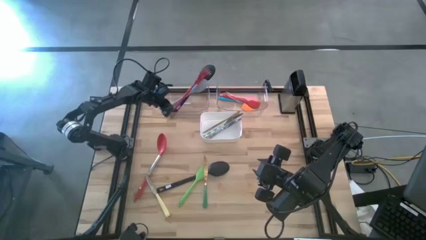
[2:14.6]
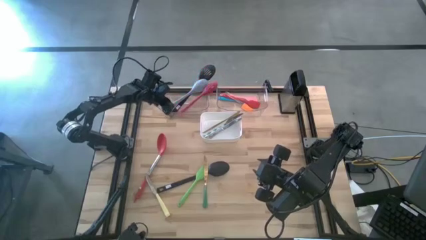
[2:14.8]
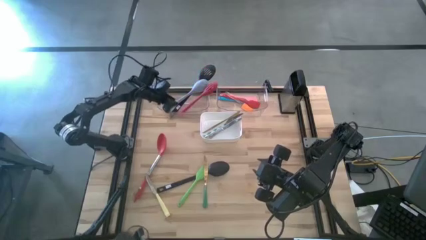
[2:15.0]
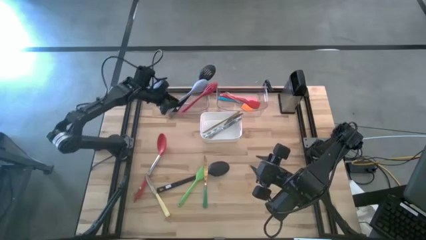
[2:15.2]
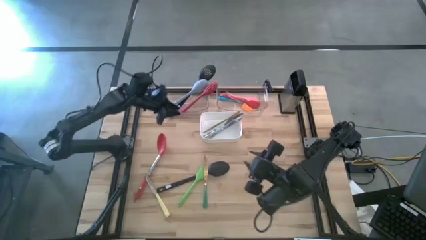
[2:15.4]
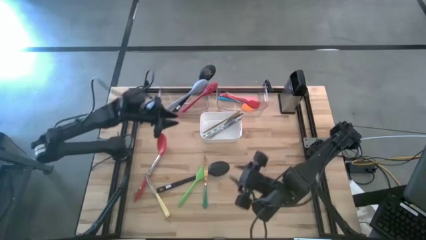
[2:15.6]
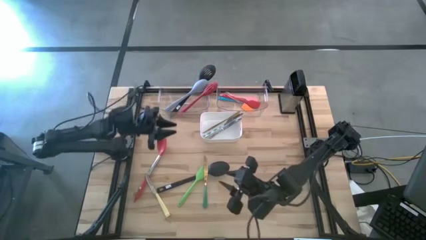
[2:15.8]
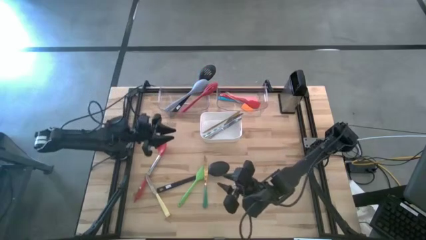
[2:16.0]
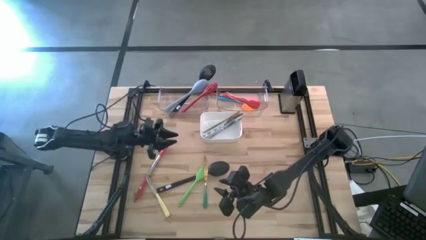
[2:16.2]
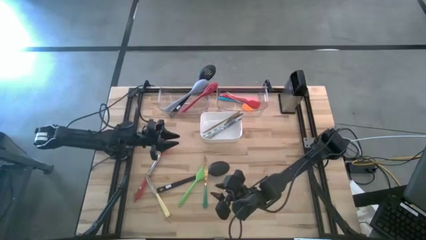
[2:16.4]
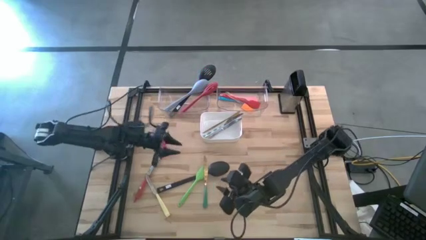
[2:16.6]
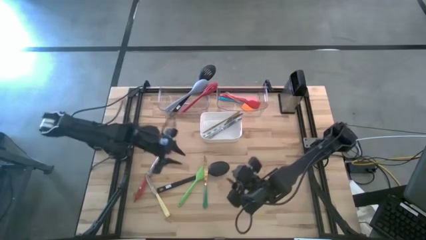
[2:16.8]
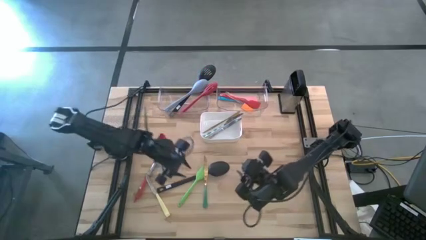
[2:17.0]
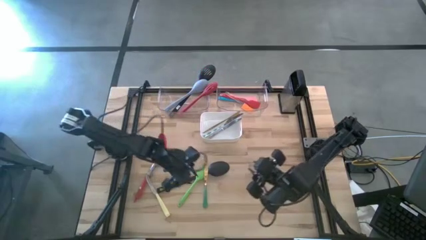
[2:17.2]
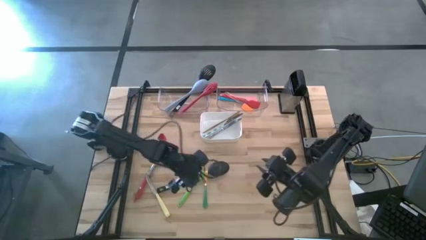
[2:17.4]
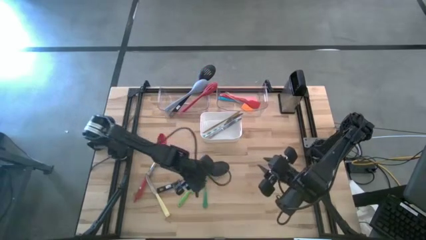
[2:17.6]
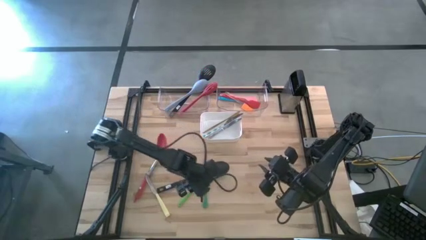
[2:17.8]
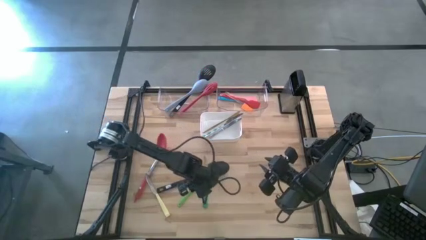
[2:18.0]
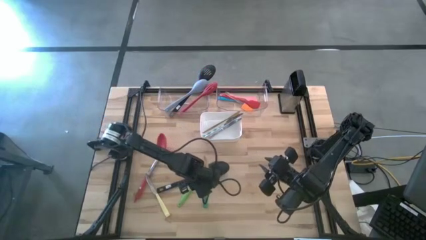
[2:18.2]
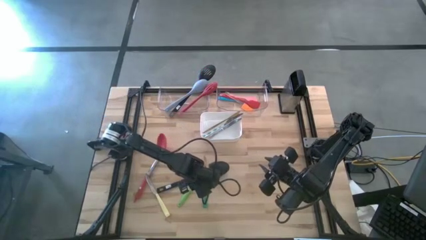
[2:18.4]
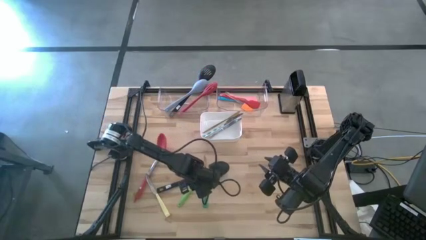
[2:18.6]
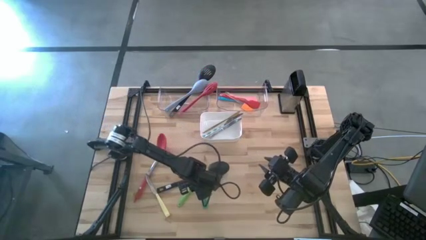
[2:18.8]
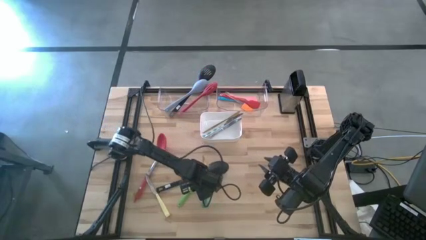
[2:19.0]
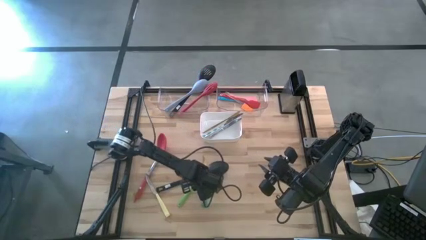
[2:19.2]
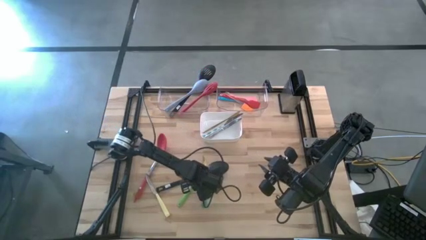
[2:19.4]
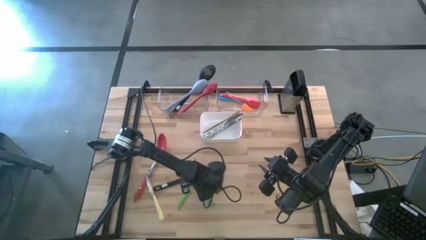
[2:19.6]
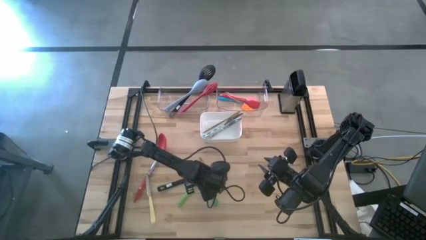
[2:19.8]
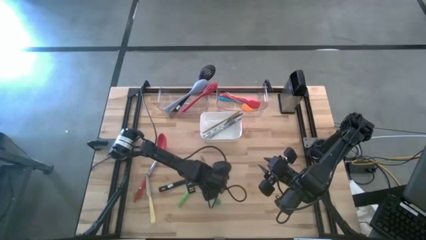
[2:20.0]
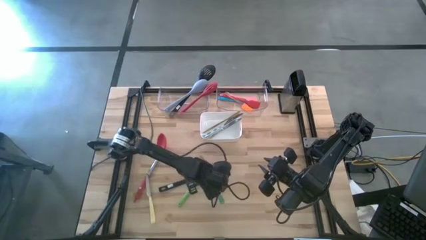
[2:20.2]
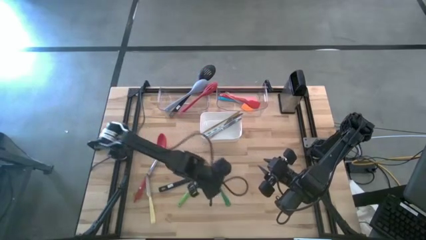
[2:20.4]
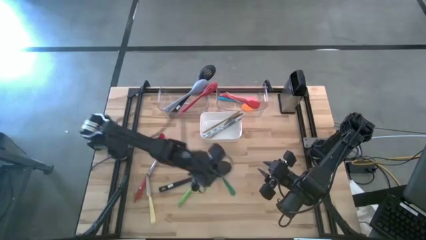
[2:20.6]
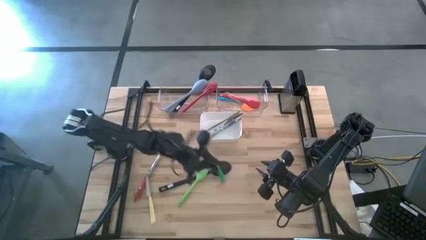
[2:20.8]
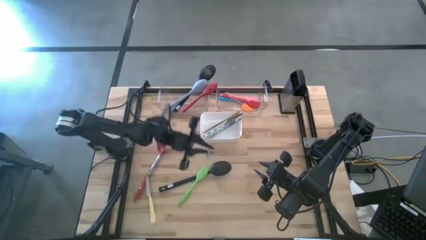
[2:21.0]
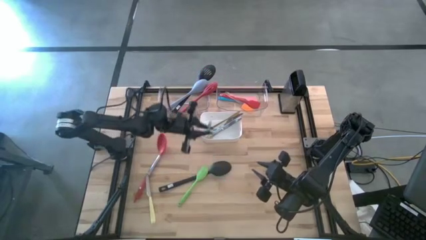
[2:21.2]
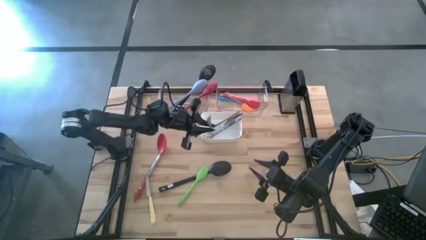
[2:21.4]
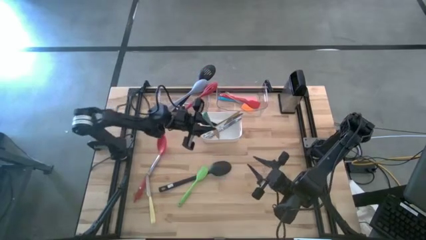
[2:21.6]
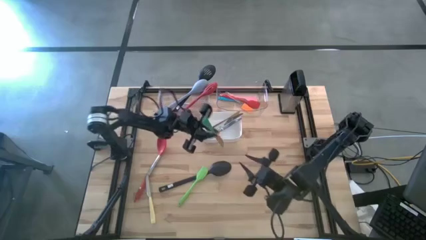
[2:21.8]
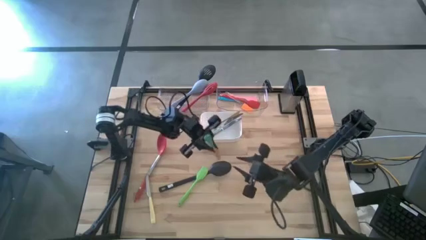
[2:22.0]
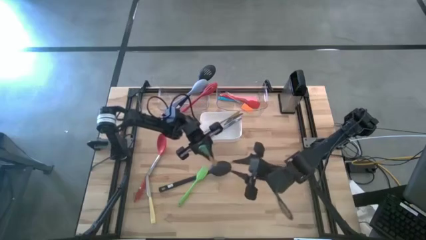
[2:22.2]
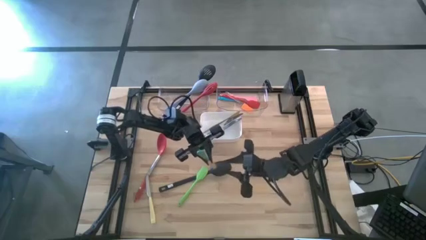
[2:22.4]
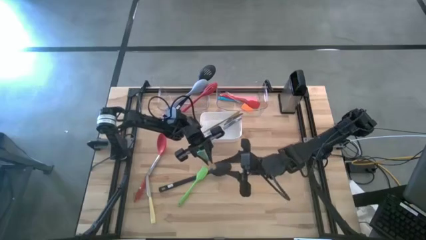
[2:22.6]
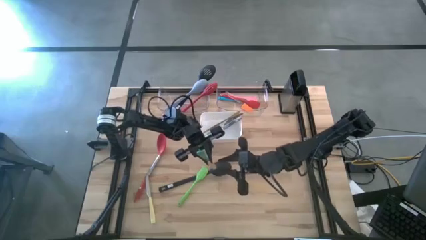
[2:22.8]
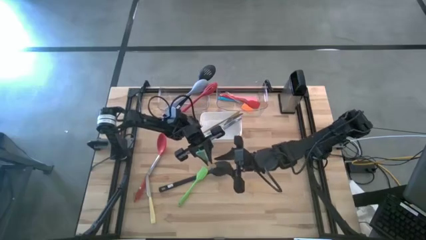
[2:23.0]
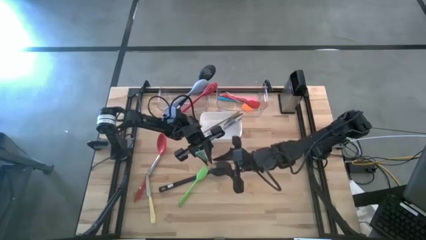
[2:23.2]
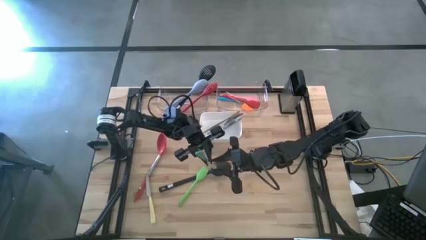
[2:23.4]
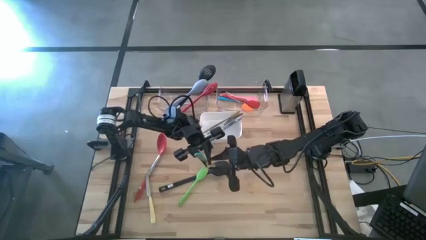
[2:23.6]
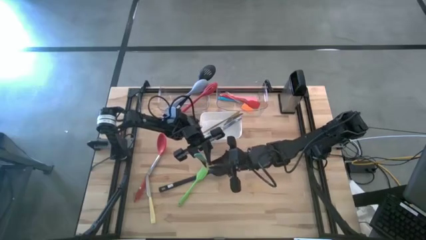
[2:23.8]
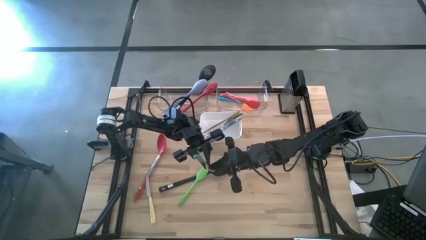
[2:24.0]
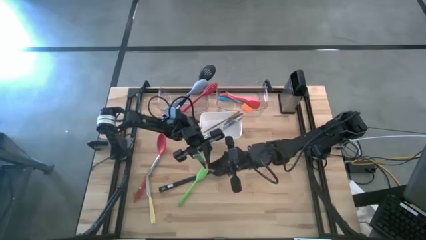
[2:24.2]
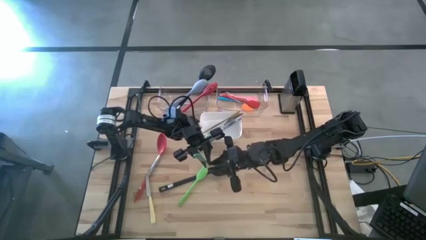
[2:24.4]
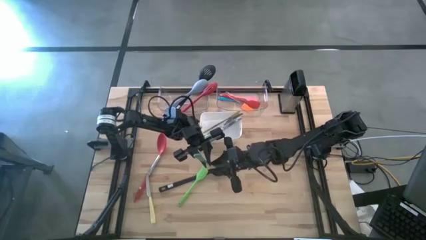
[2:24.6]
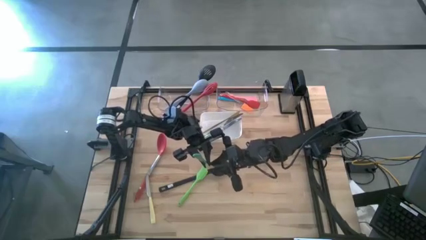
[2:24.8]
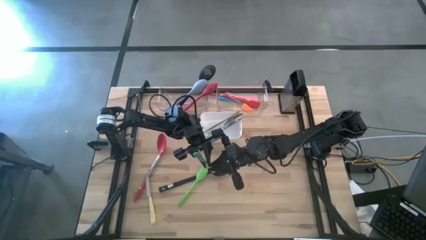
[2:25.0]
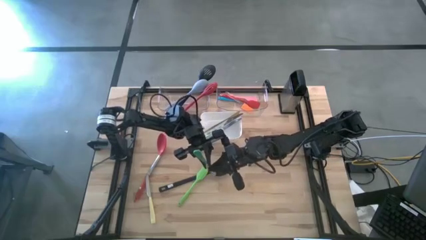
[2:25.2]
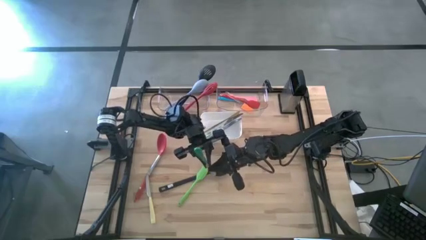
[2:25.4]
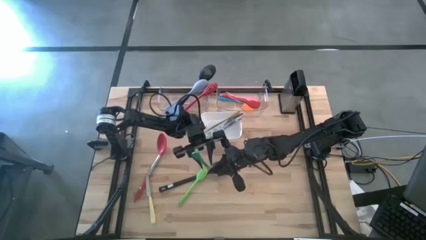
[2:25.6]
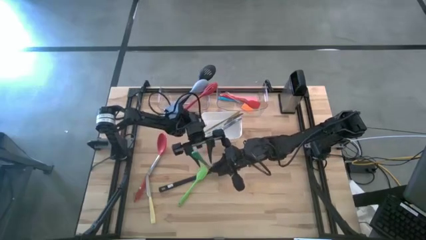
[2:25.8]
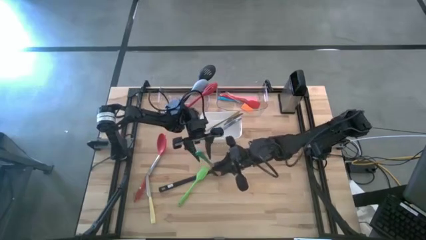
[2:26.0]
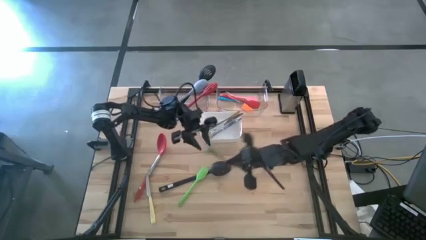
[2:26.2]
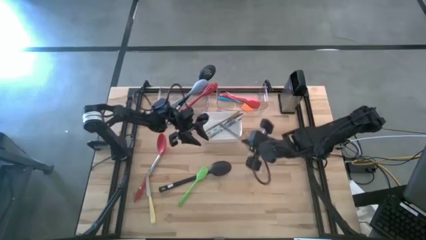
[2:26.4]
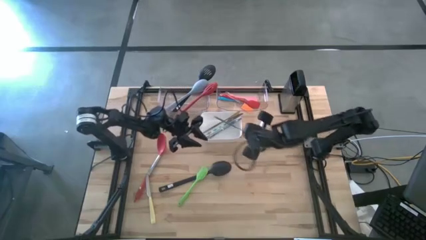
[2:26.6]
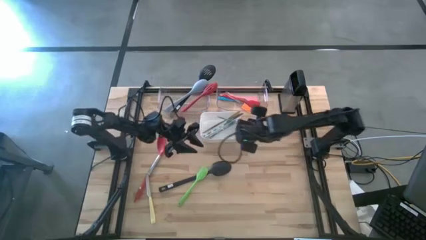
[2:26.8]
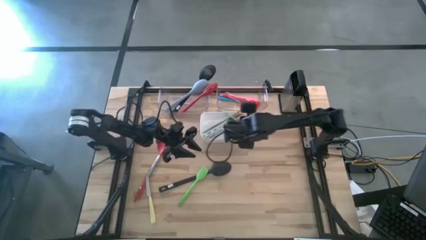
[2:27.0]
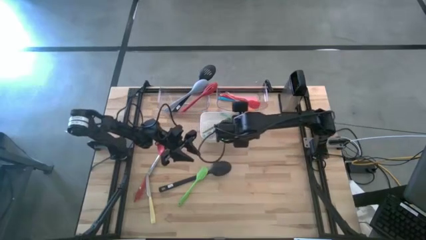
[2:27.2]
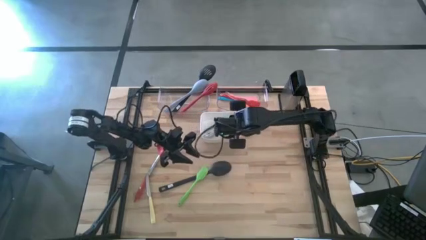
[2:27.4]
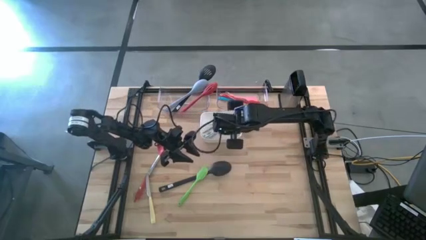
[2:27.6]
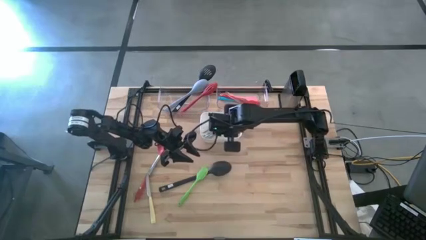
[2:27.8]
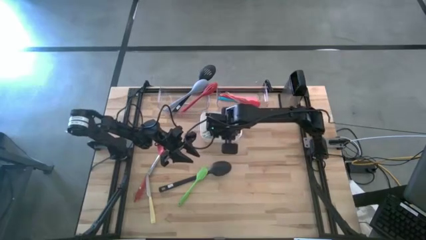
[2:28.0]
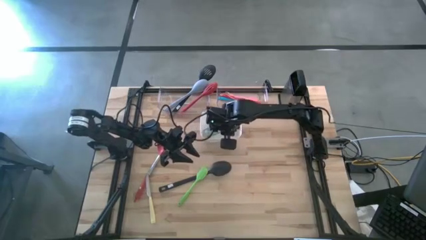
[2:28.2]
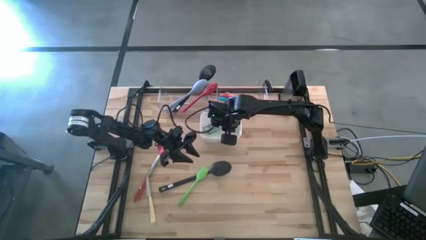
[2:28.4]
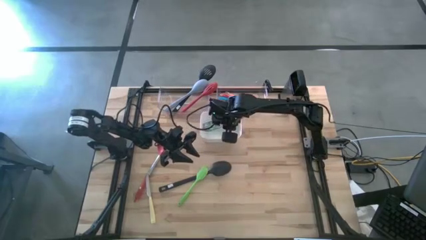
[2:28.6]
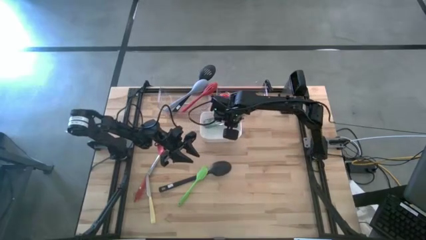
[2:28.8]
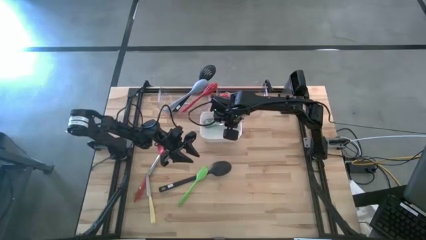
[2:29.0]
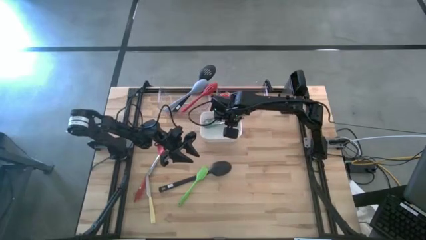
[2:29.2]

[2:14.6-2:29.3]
Task: Pick & Place Kitchen Items
Put the green table knife into the white bin

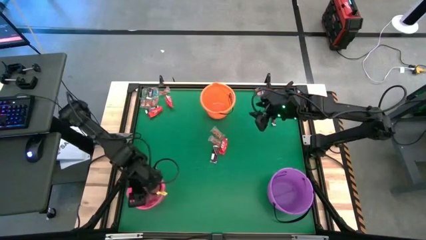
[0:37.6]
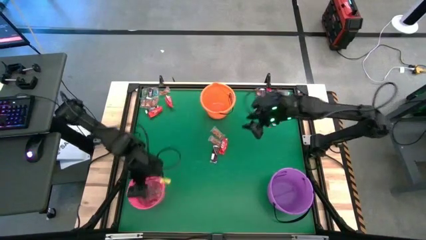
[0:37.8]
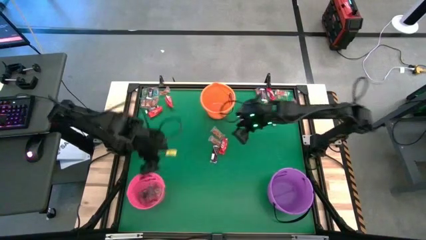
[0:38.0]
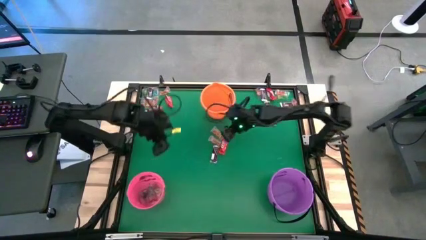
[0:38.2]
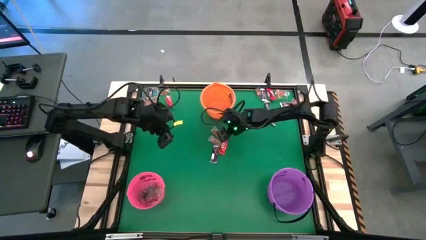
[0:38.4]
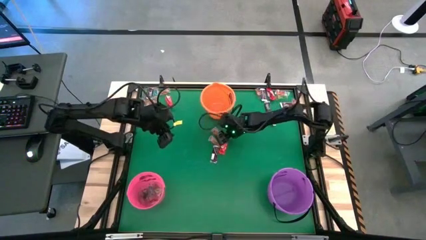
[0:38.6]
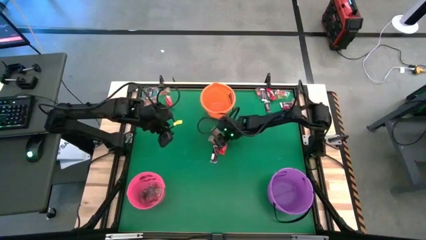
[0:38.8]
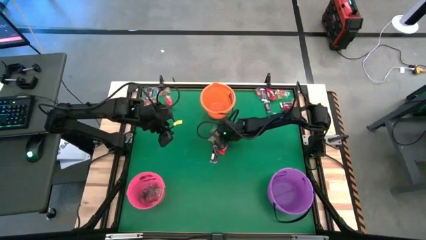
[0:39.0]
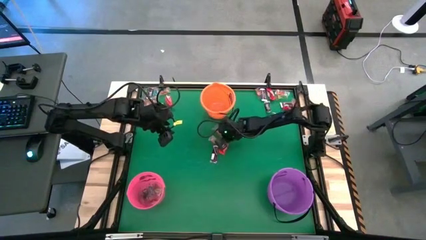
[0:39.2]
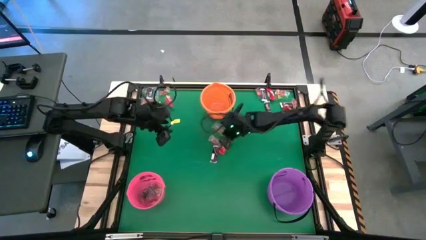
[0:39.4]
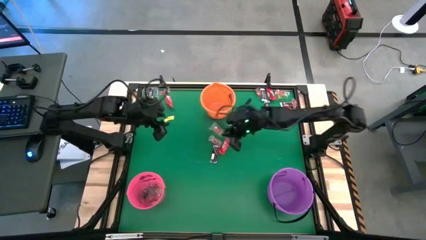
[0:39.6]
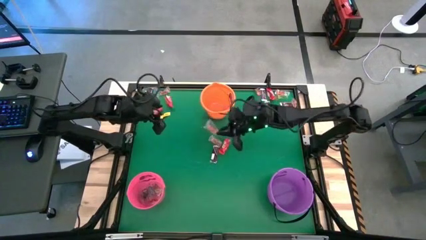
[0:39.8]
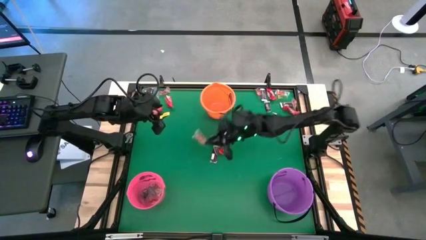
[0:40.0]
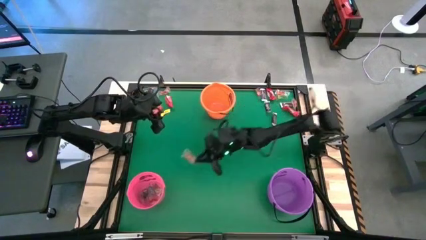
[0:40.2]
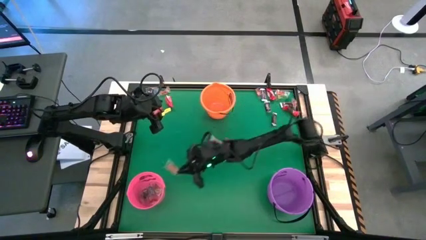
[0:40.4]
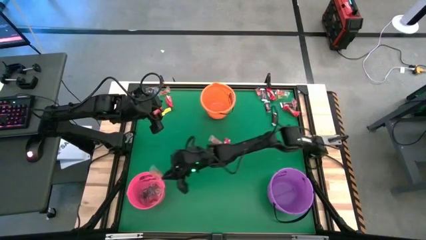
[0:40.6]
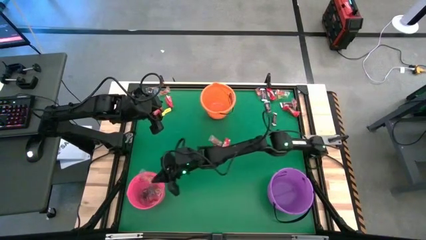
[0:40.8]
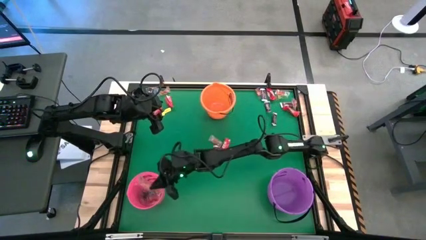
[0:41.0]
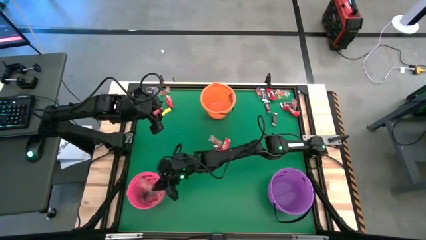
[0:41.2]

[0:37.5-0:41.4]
Task: Sort candy by brand, put in halloween buckets
Put the orange gummy into the pink bucket
